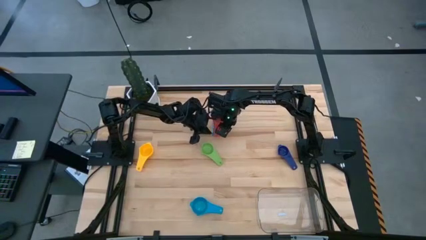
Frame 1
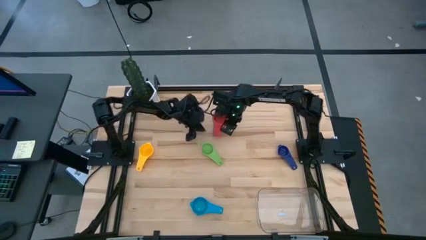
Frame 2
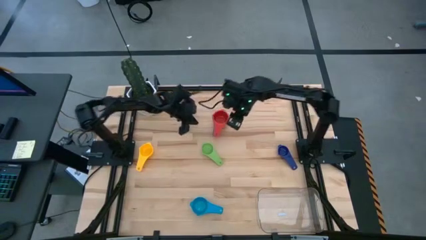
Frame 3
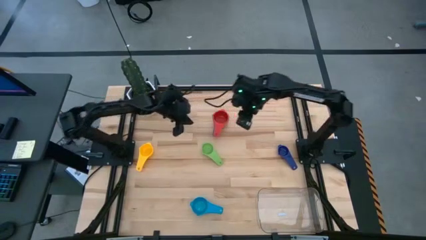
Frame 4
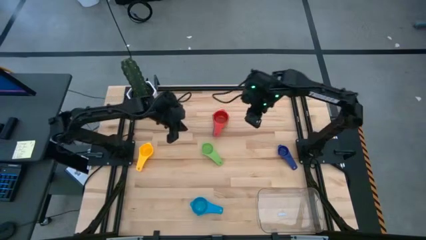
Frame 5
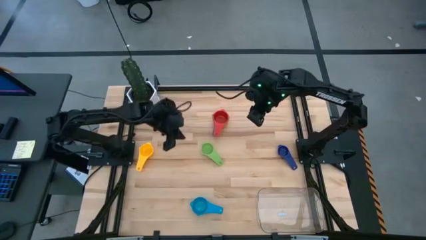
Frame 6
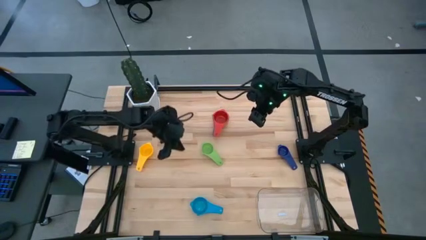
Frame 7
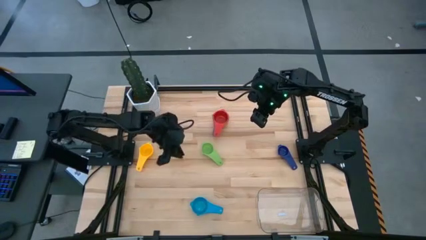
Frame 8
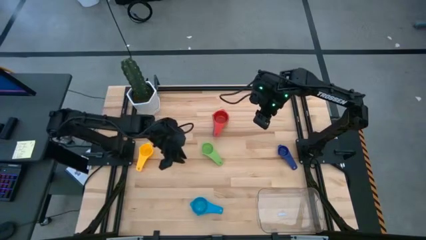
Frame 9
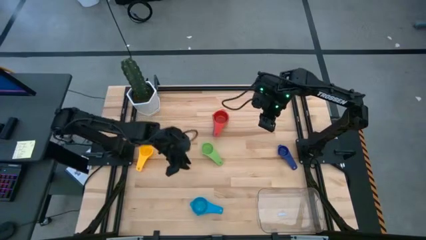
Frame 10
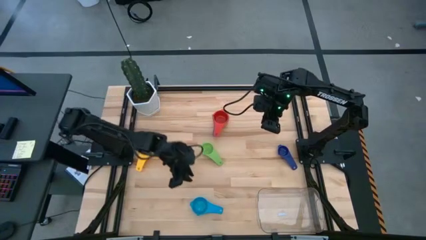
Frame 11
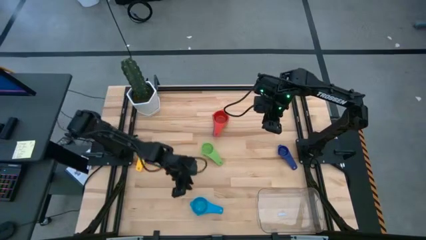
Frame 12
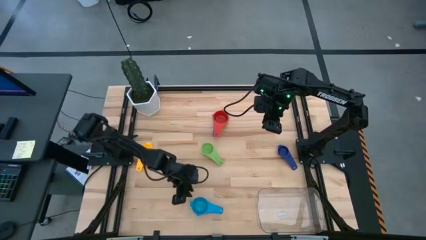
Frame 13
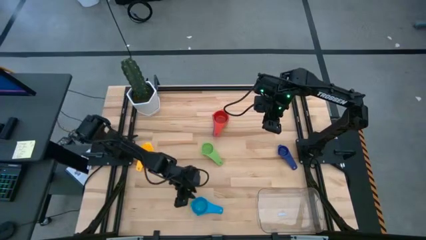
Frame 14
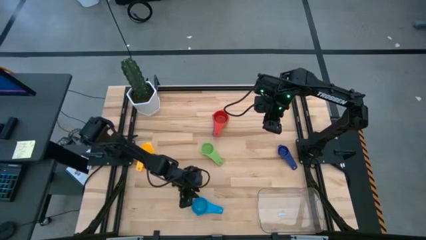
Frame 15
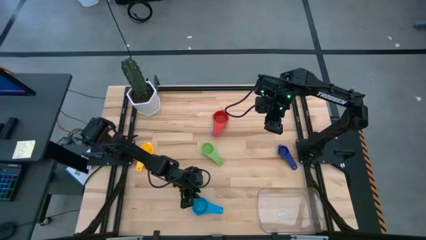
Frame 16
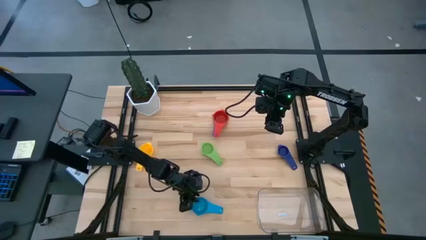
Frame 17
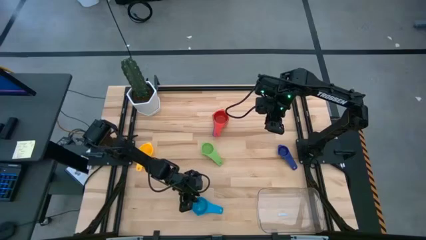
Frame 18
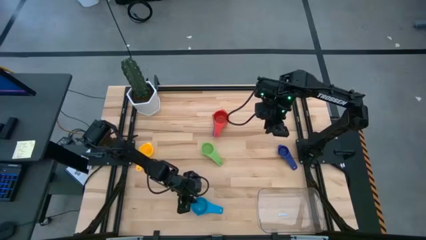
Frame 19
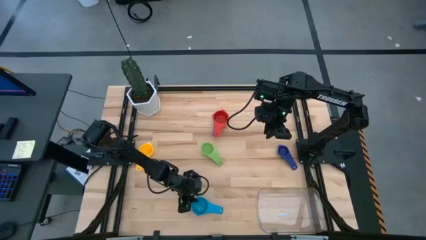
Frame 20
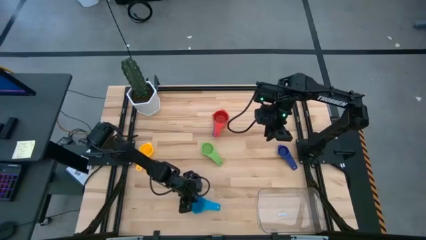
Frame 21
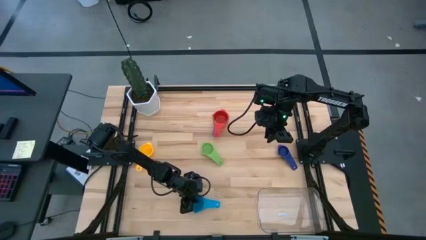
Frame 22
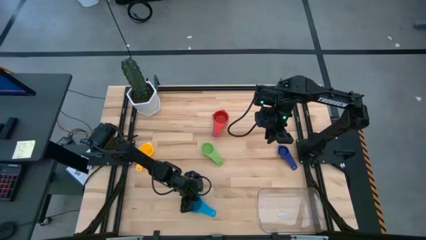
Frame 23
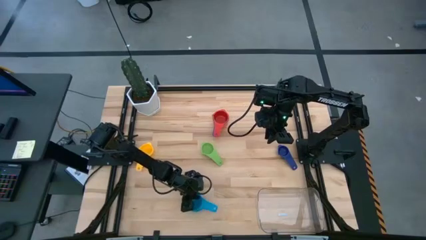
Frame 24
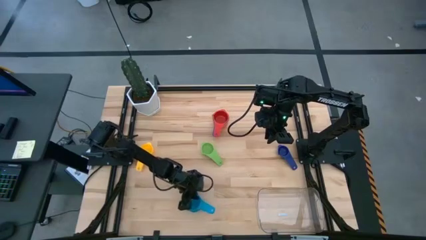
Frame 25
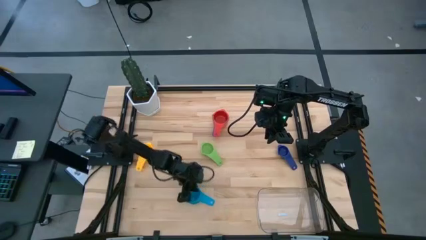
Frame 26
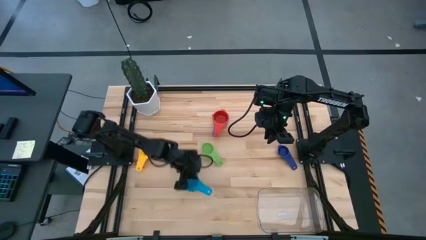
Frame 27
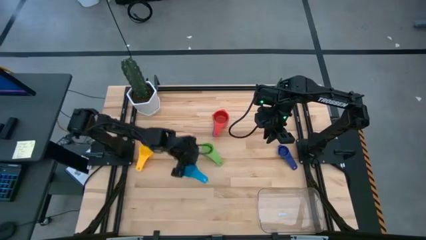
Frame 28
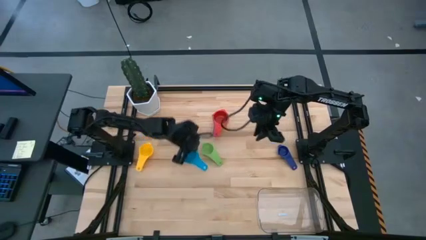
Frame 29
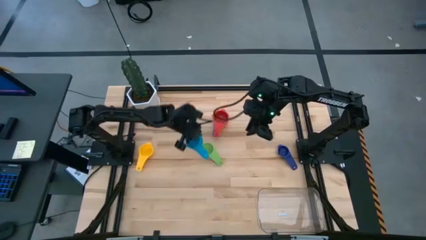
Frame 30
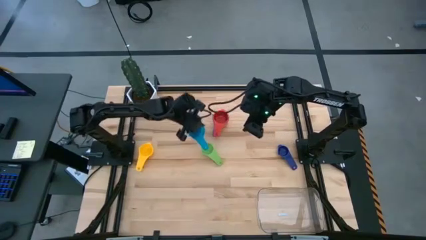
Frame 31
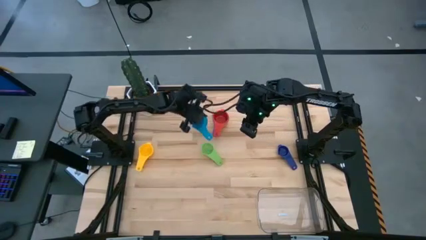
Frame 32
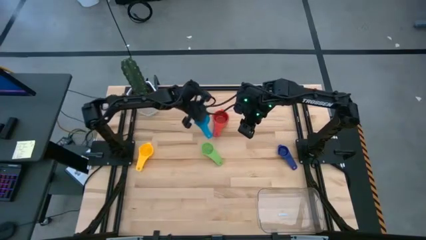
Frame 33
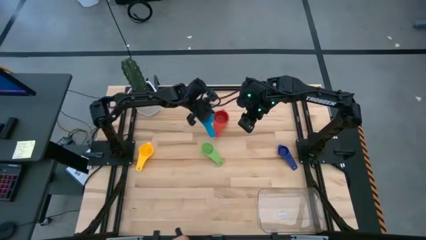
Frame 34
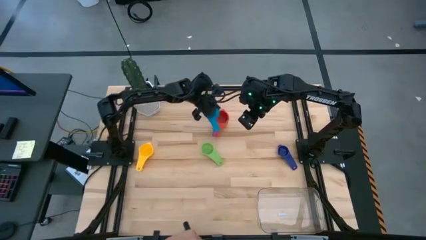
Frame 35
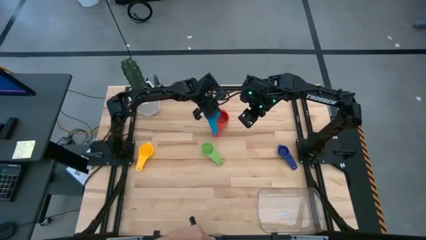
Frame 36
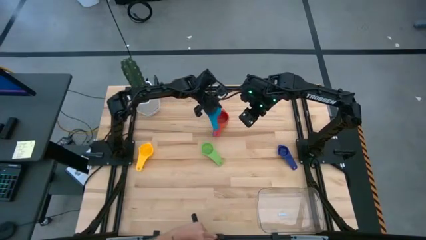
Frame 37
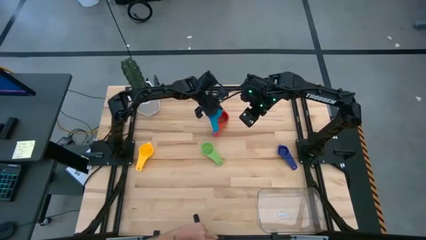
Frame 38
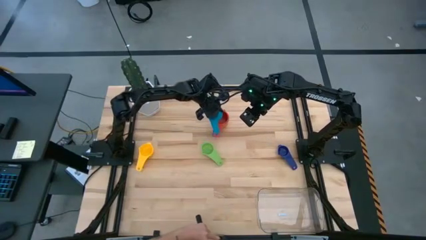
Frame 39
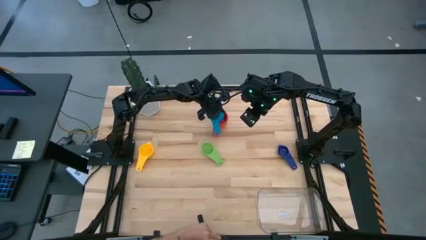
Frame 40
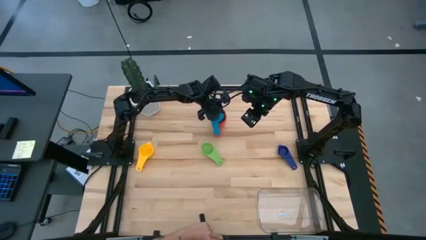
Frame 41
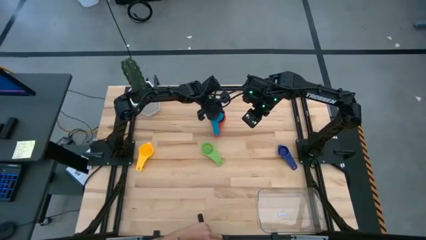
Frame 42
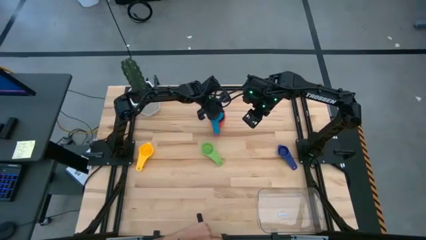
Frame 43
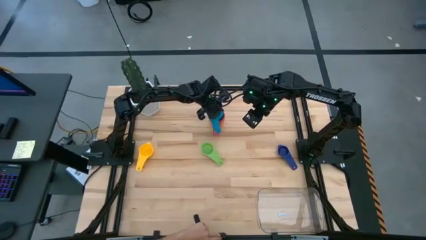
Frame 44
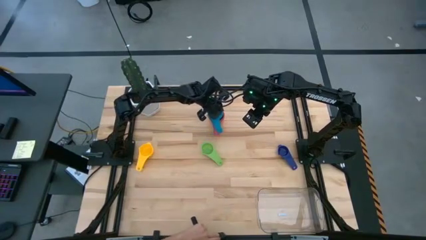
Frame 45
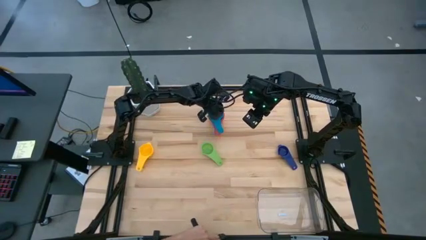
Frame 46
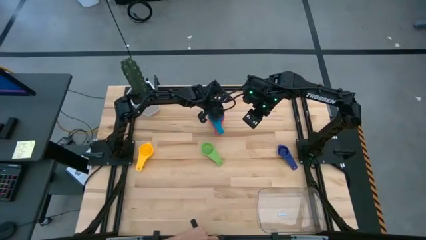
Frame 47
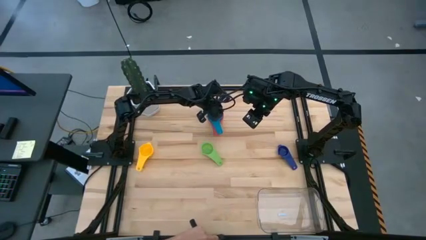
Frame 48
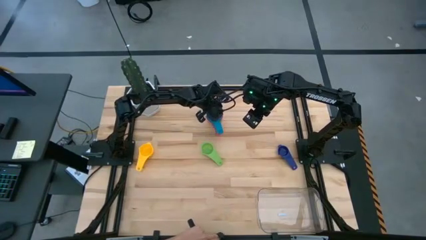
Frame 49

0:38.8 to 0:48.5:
Task: Nest measuring cups in basket
Stack the light blue measuring cup on top of the red measuring cup

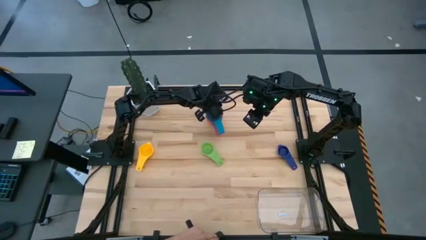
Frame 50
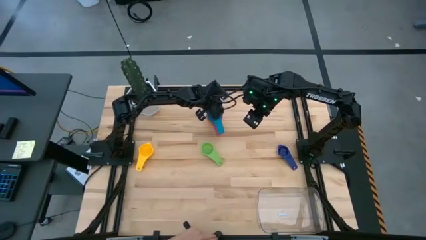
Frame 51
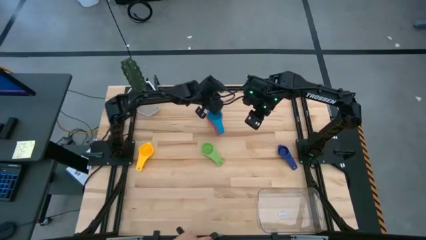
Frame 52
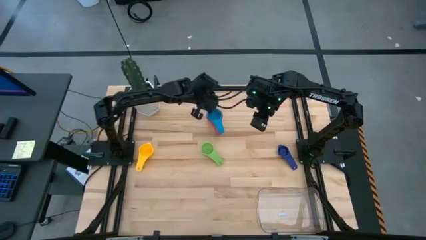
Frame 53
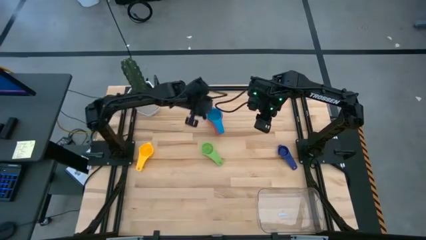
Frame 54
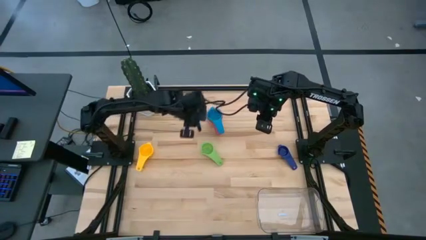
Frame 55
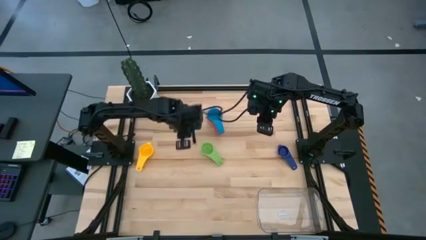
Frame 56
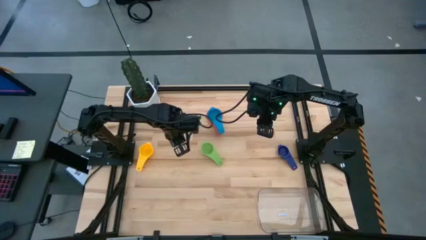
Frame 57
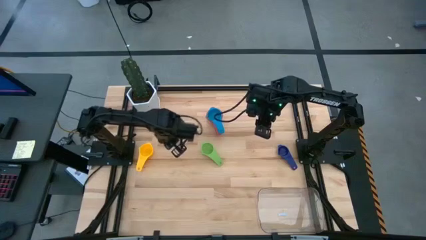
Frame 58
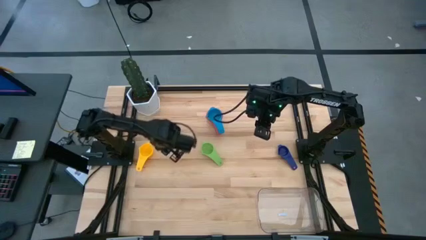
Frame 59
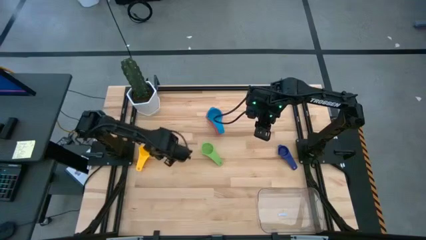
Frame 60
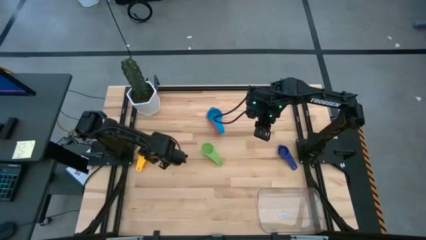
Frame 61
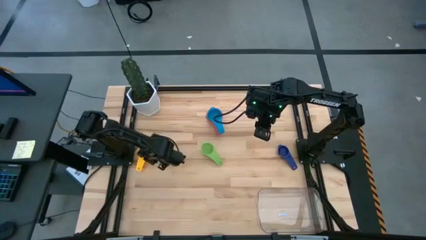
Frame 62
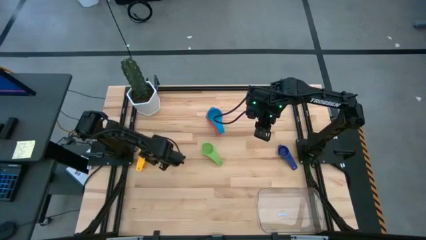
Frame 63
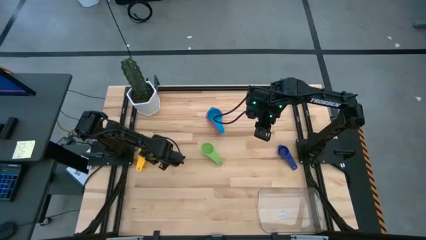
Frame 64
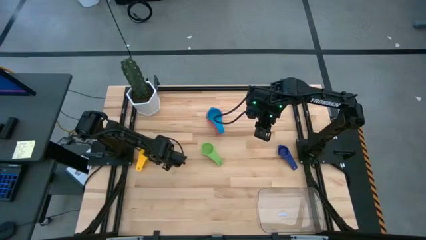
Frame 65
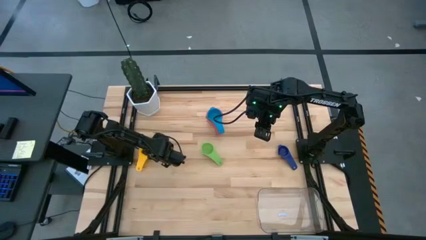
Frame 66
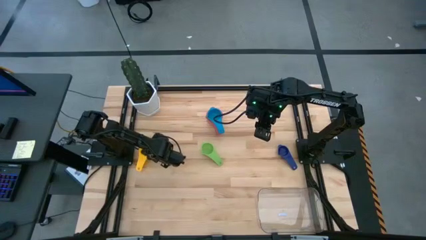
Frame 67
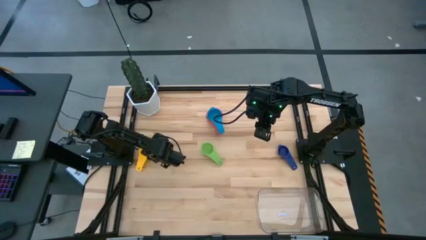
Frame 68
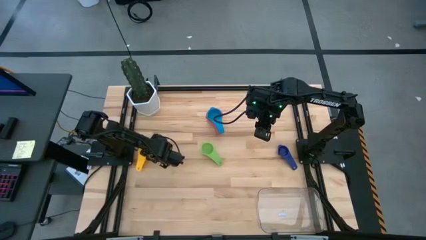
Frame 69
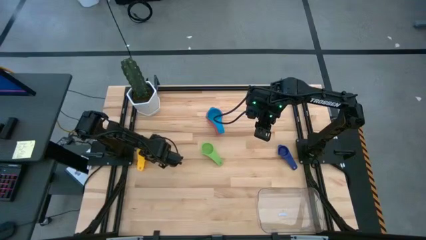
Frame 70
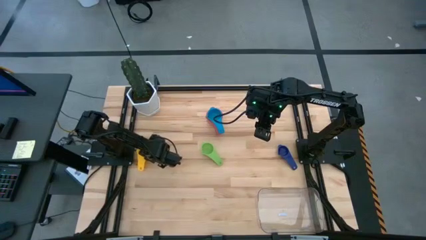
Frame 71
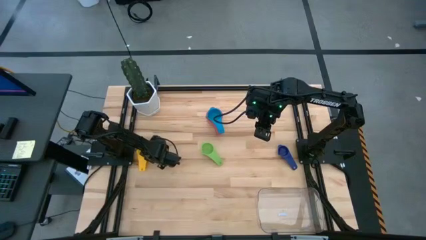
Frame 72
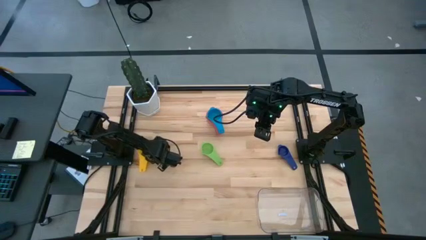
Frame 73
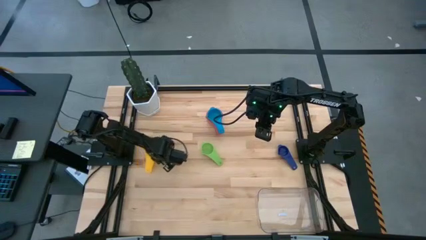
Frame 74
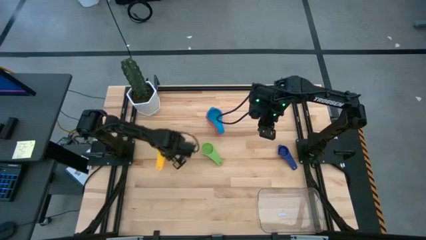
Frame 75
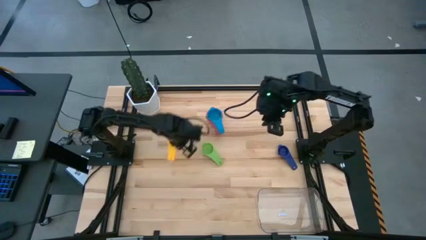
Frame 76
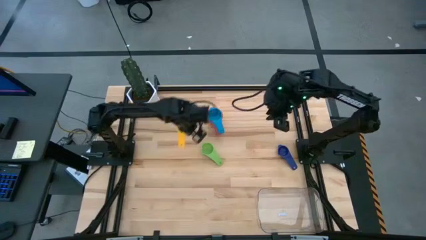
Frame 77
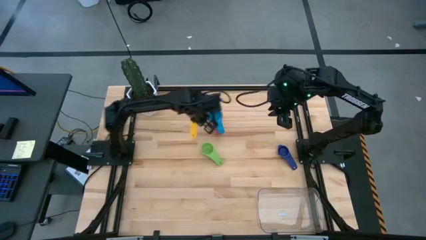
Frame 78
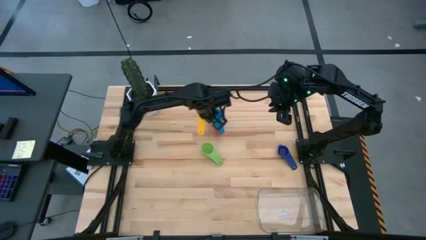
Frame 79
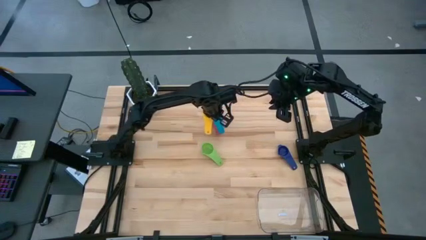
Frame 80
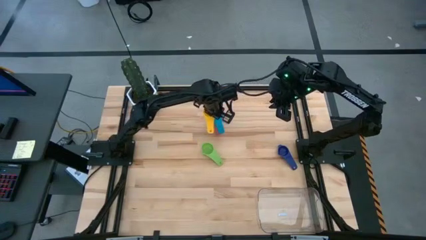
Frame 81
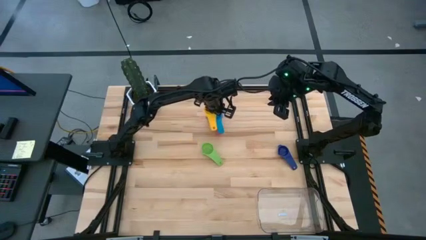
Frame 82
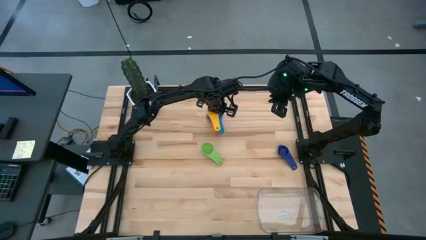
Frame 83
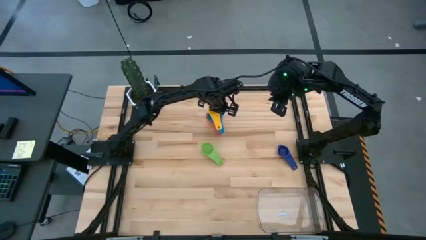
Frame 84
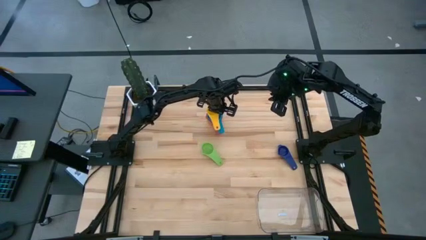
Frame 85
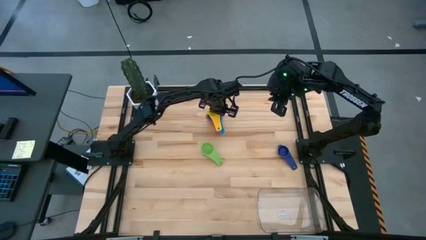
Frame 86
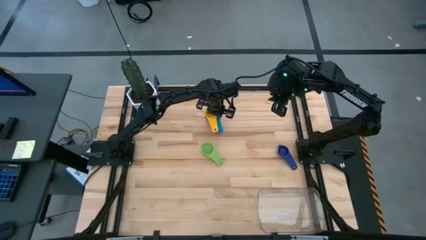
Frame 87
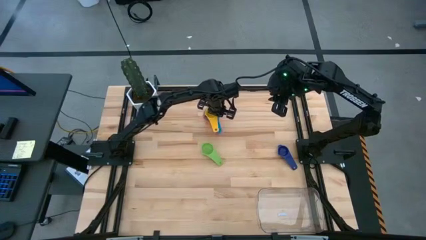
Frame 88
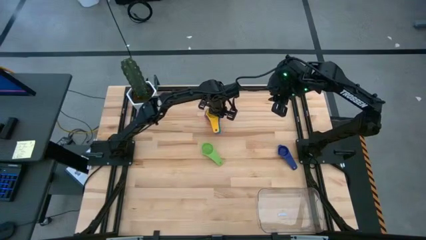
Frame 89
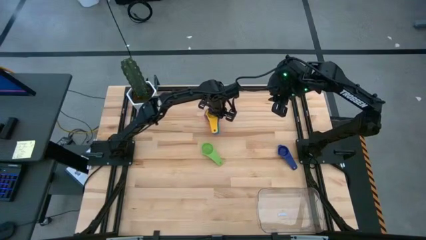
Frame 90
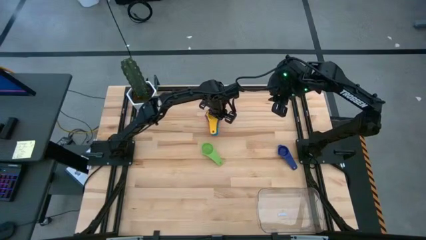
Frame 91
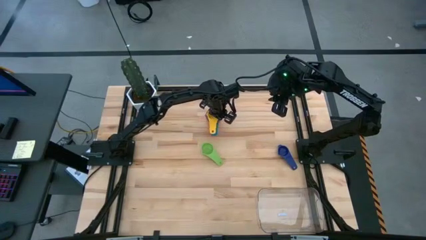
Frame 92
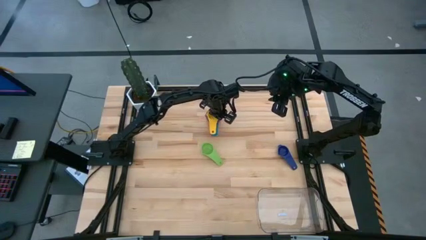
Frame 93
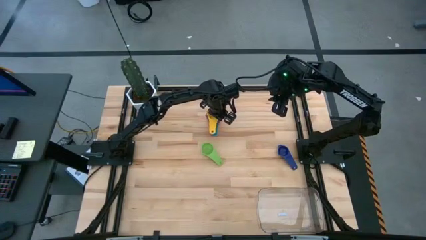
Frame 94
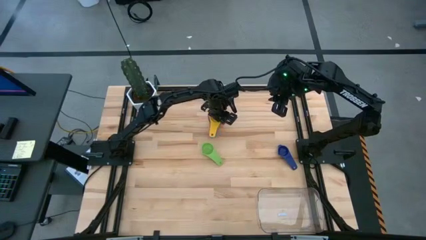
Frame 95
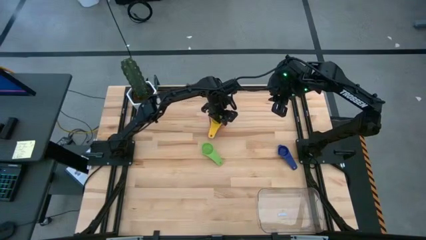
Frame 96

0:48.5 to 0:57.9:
Stack the yellow measuring cup on top of the light blue measuring cup
